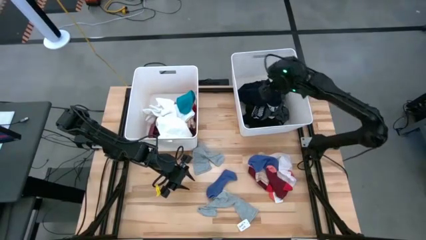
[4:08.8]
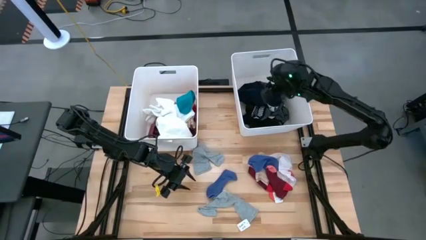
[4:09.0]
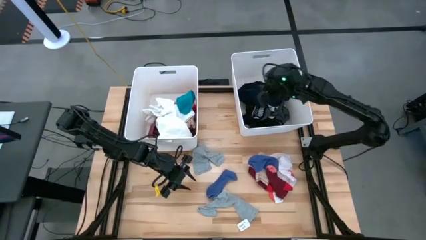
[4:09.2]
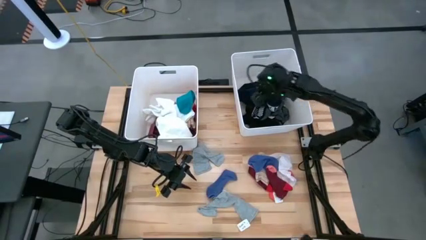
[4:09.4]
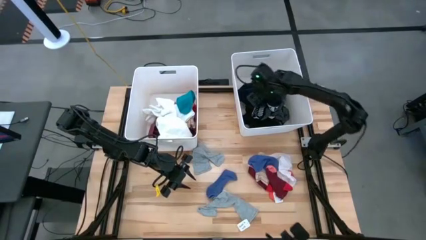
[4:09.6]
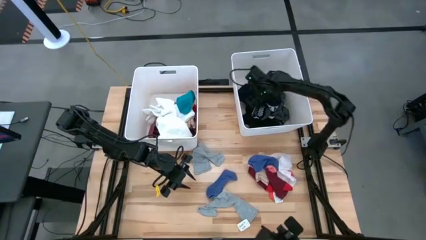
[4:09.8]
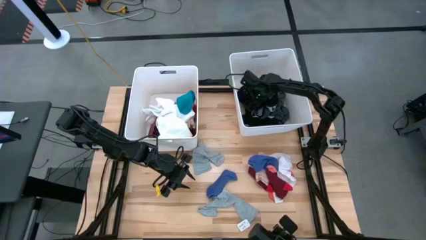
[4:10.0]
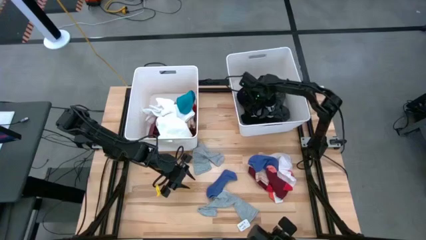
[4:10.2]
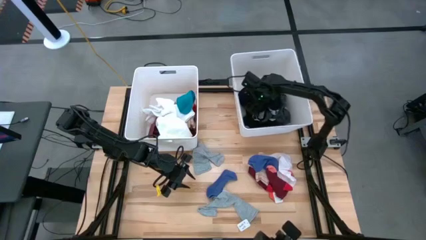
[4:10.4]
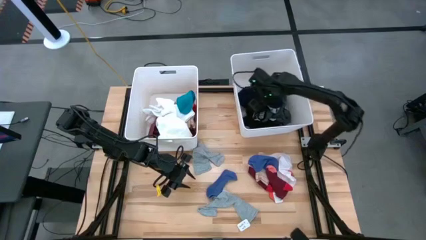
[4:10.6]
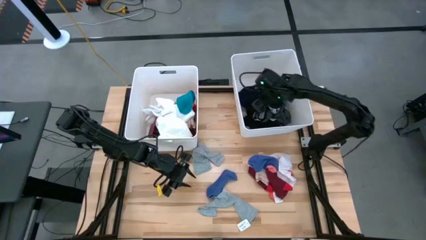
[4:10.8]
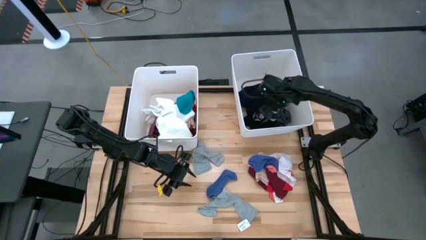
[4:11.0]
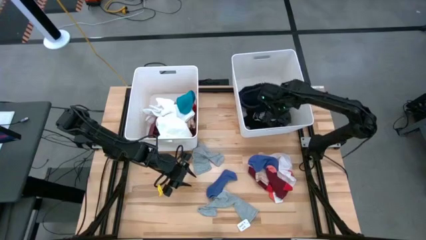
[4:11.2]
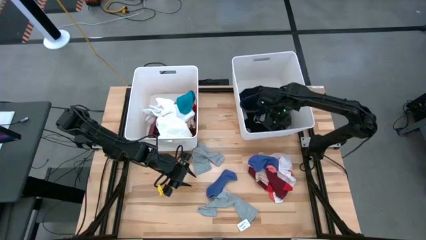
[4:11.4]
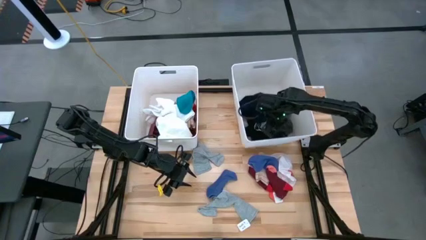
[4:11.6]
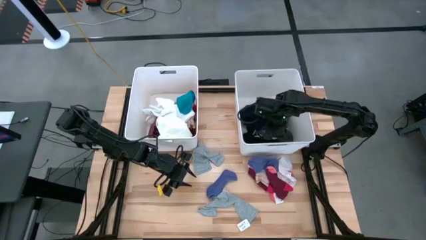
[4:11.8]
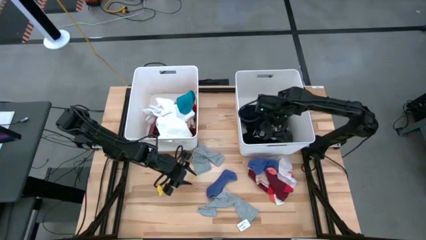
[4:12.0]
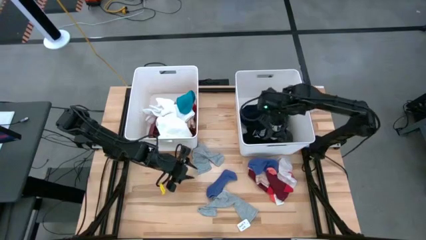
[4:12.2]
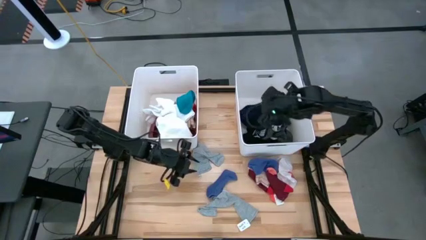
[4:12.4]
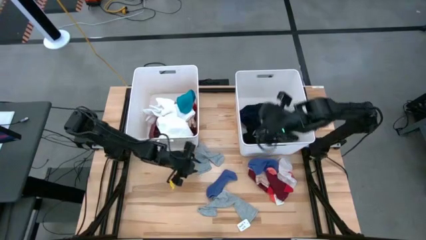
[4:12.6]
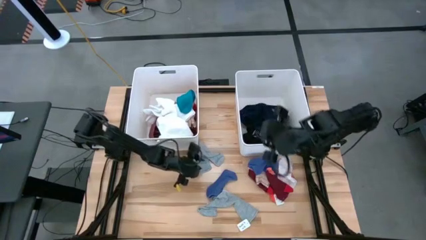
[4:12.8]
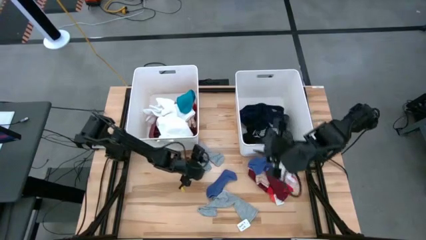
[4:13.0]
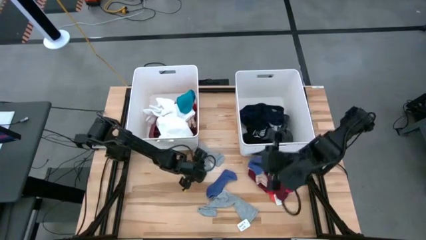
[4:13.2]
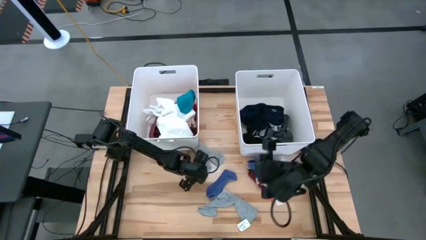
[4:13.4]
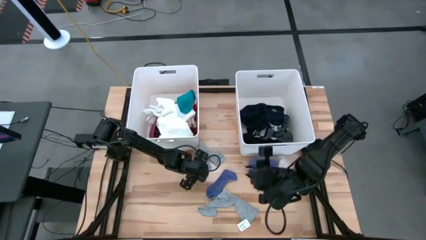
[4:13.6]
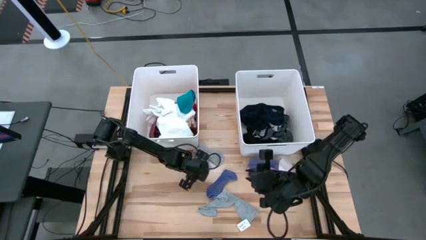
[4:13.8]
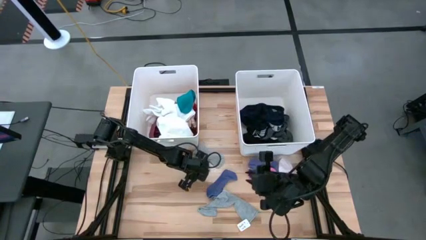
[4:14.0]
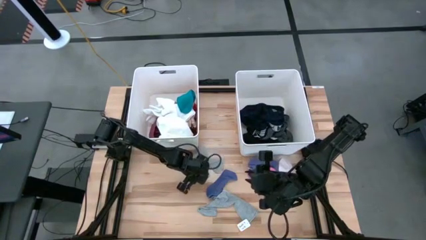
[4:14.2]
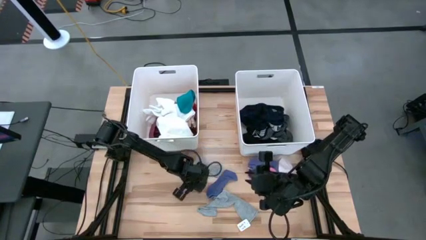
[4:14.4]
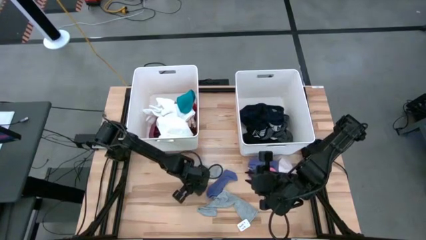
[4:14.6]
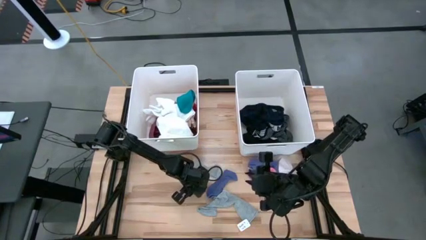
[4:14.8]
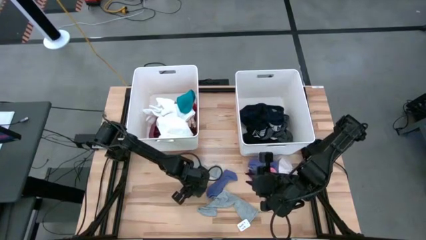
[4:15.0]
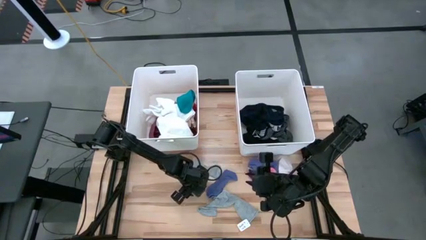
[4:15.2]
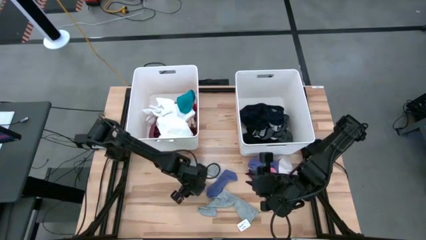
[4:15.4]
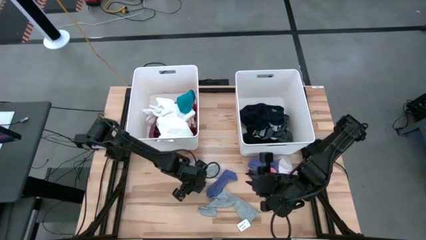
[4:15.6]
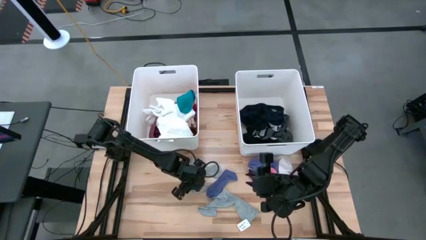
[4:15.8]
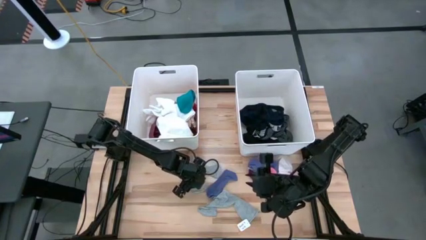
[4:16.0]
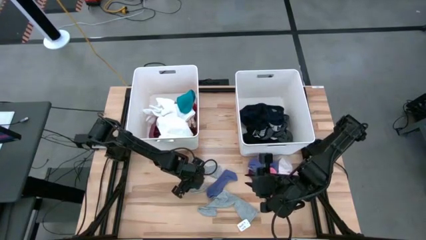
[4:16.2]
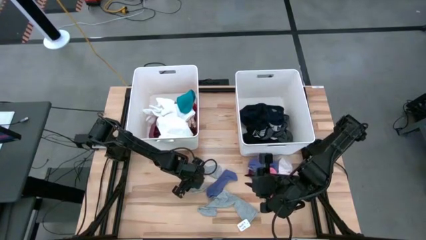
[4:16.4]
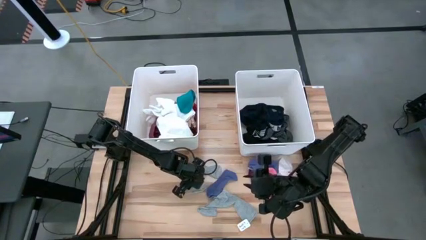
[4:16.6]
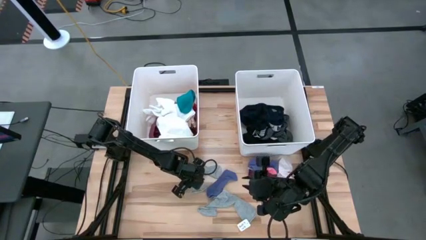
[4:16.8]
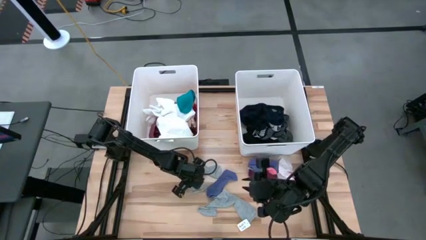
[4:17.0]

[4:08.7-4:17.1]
Task: Sort clothes
Put the gray sock into the right white bin

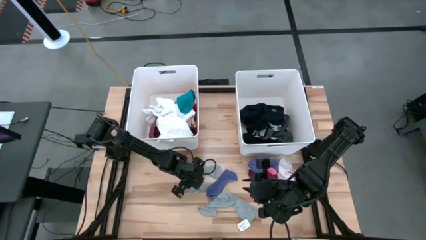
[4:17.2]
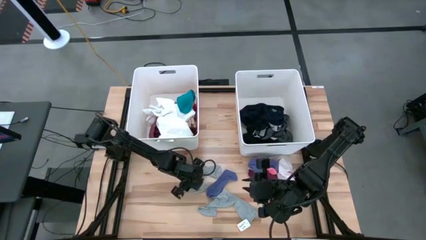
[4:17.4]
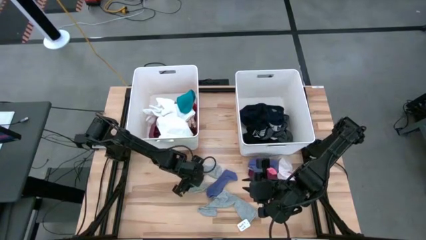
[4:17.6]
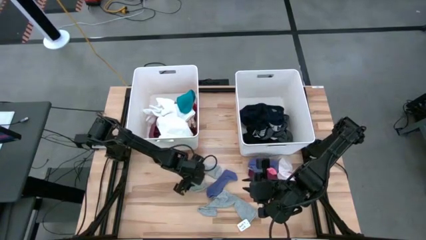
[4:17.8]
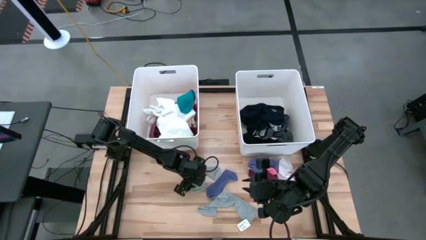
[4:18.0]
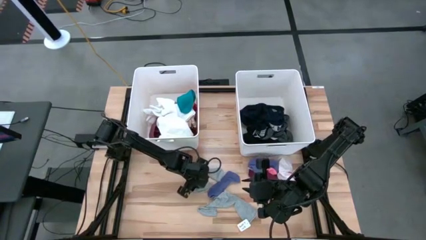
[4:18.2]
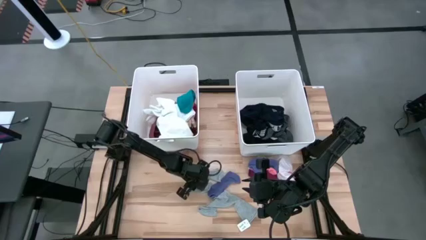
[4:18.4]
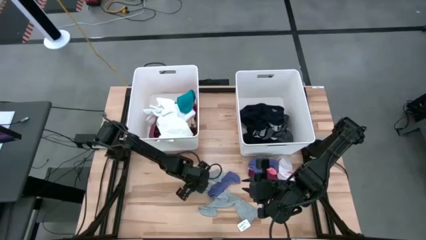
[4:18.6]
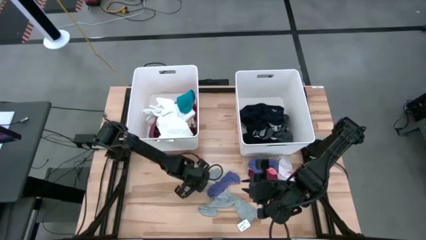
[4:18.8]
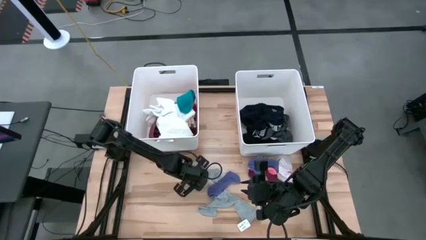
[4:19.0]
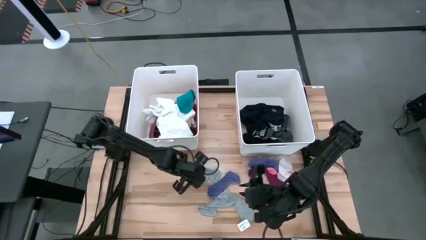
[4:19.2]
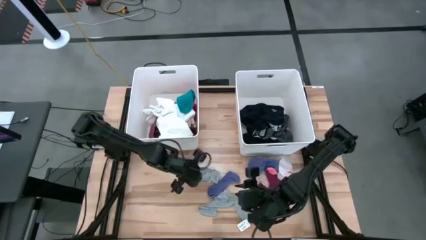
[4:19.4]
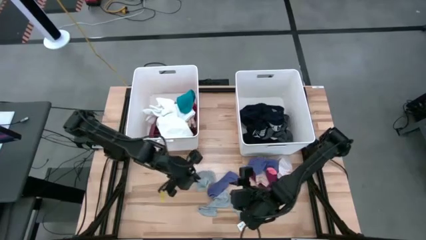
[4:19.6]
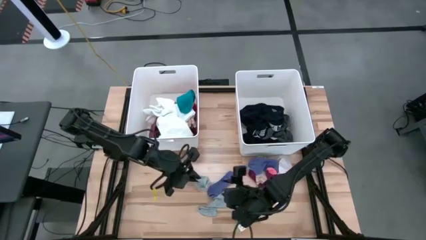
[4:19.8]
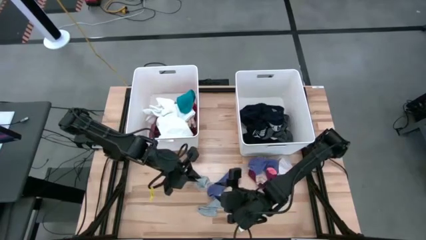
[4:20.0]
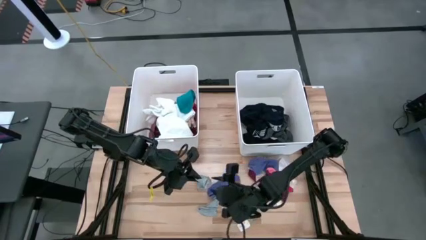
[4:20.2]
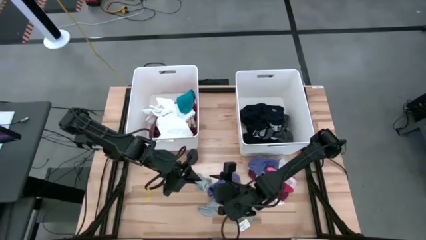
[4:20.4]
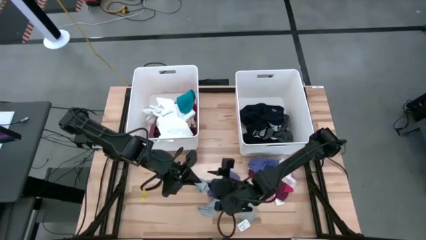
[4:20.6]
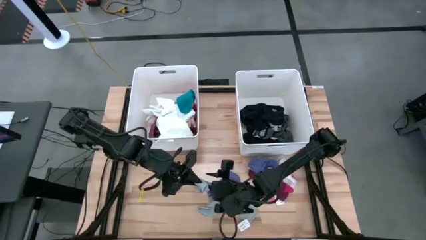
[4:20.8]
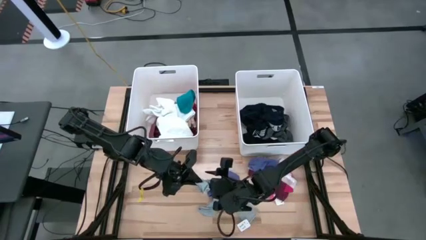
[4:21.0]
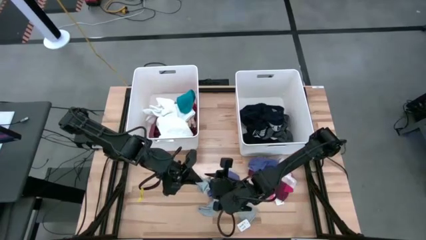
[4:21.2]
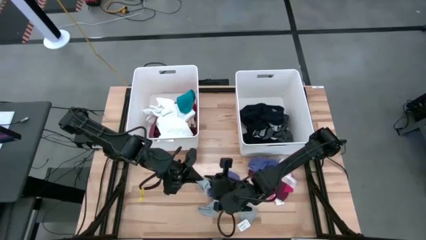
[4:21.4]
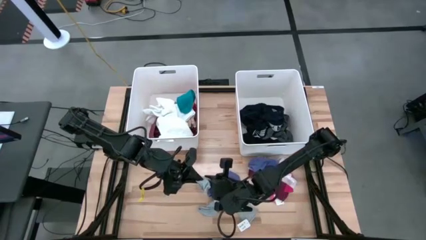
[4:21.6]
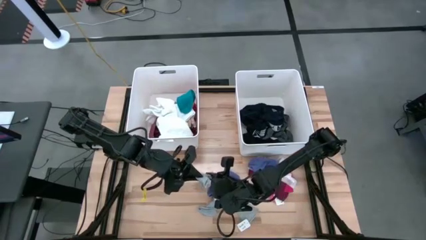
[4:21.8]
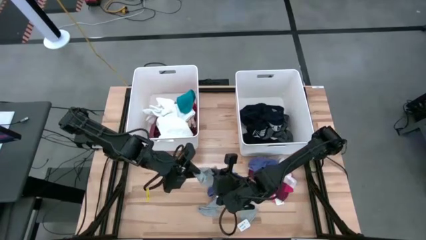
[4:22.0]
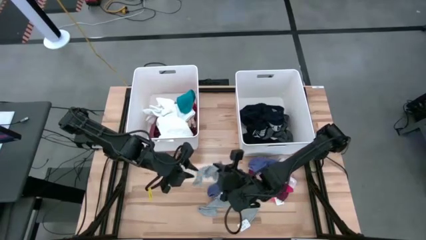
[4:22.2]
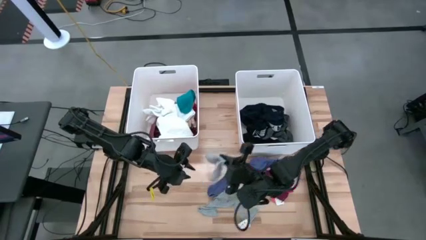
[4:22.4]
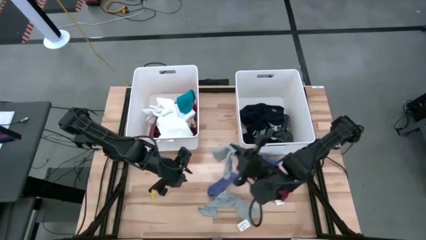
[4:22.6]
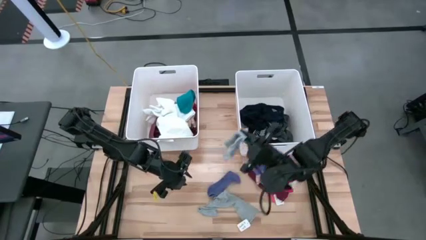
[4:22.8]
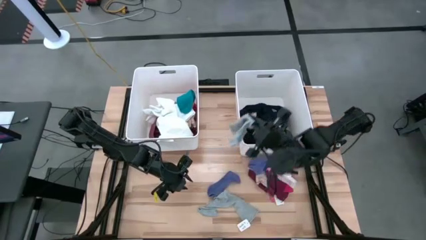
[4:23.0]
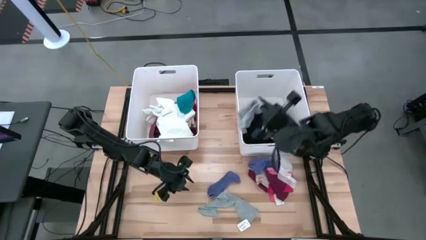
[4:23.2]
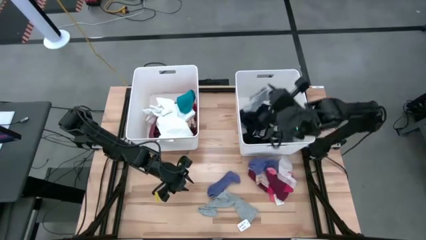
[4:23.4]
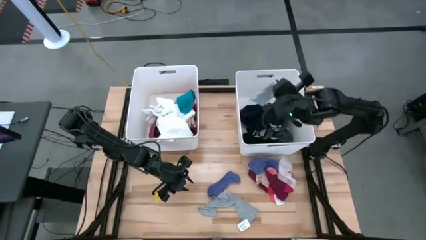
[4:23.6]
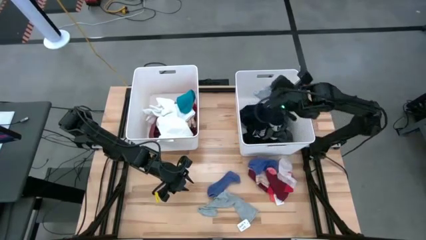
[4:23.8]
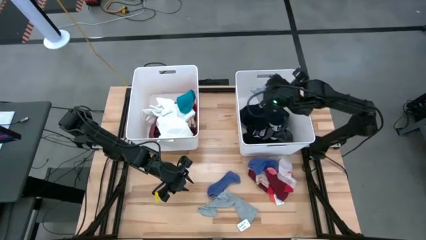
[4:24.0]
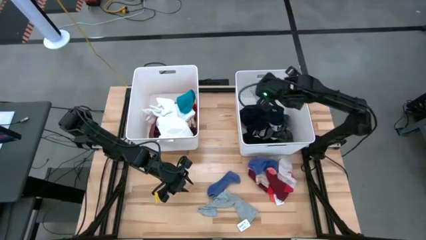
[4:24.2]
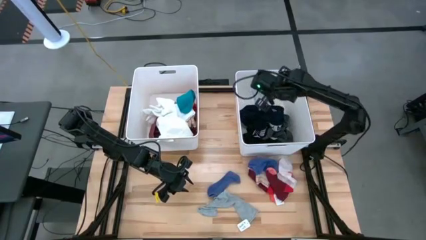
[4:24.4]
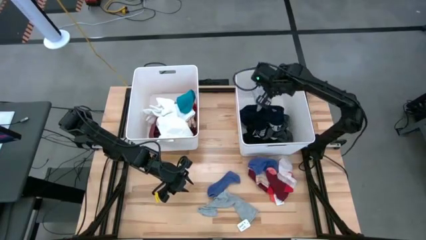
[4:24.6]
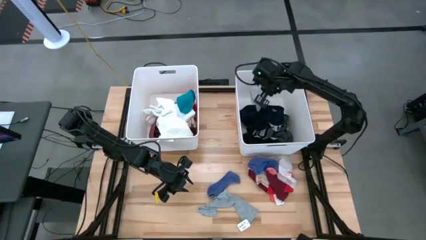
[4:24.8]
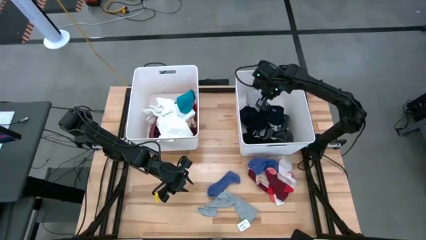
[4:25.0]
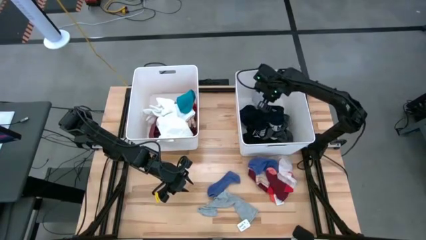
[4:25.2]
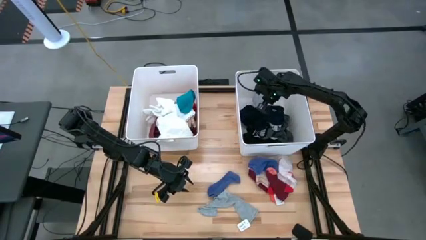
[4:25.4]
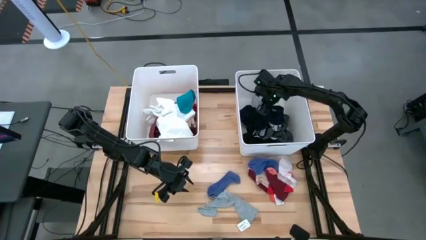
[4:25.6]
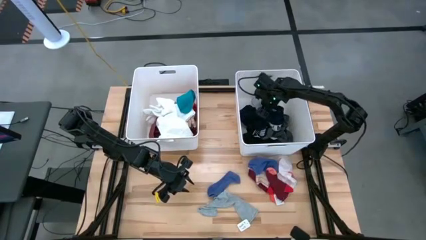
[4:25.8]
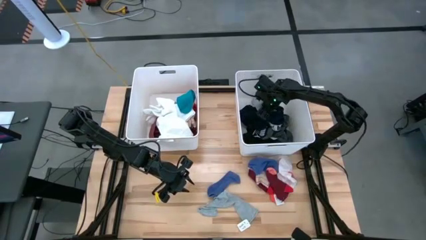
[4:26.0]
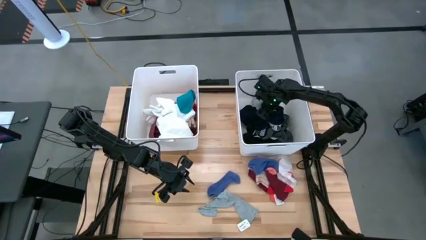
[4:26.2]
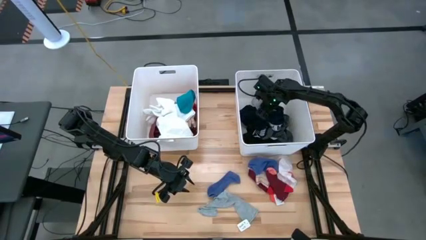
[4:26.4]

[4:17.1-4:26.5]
Put the gray sock into the right white bin
